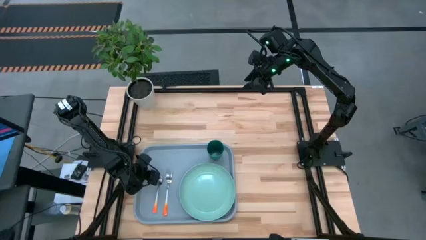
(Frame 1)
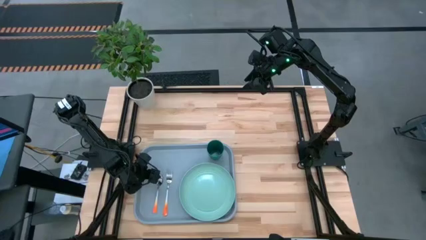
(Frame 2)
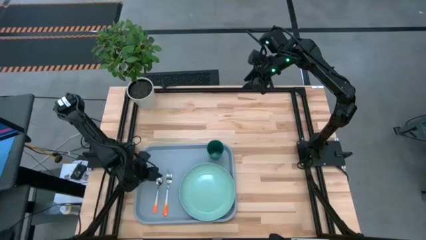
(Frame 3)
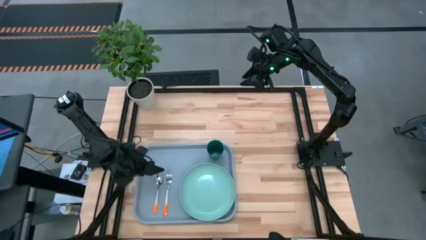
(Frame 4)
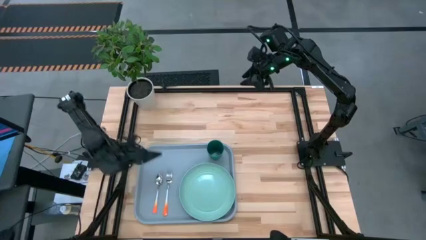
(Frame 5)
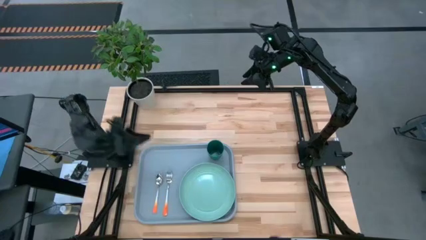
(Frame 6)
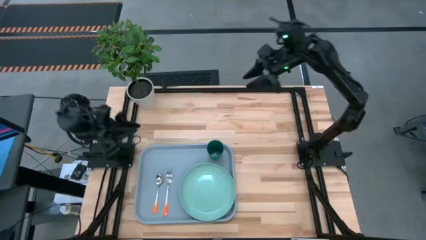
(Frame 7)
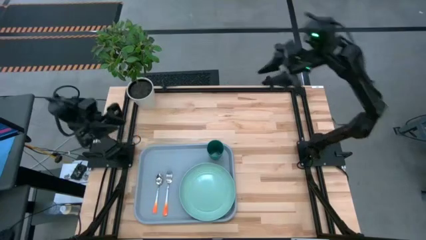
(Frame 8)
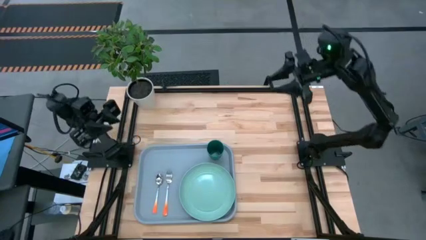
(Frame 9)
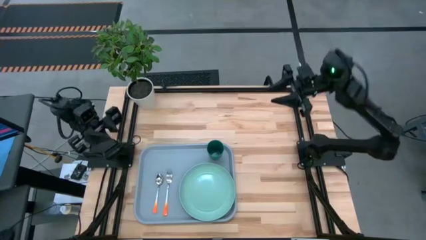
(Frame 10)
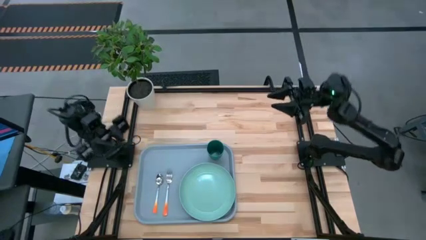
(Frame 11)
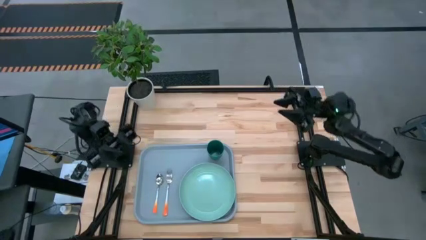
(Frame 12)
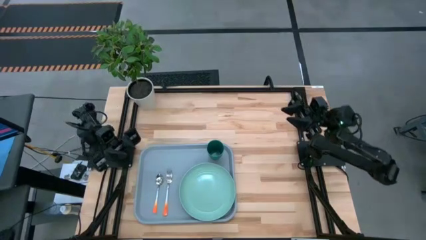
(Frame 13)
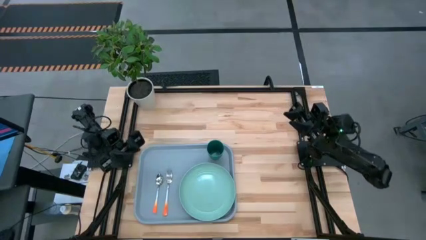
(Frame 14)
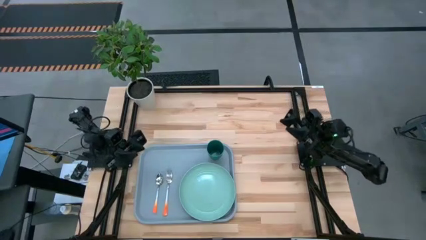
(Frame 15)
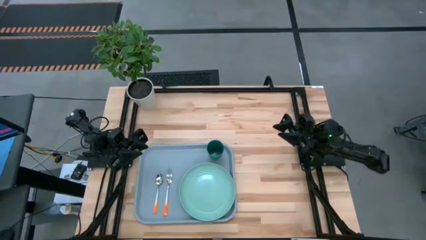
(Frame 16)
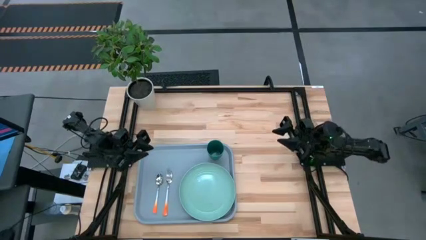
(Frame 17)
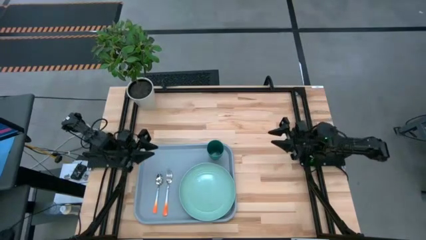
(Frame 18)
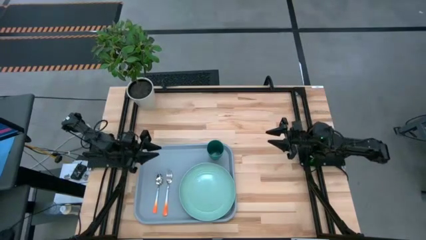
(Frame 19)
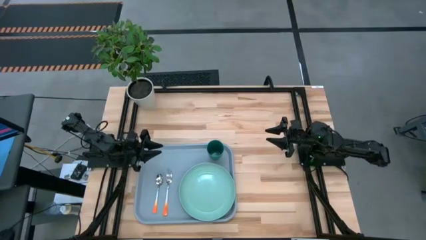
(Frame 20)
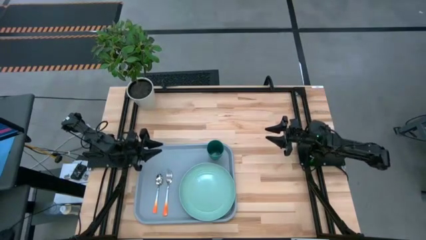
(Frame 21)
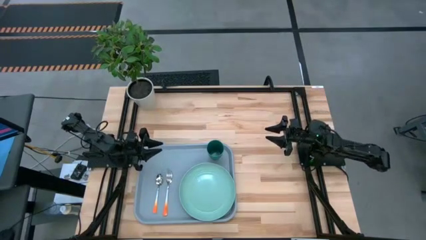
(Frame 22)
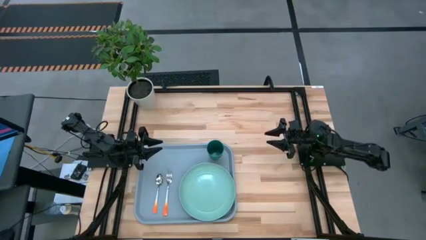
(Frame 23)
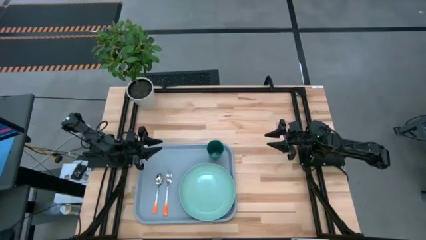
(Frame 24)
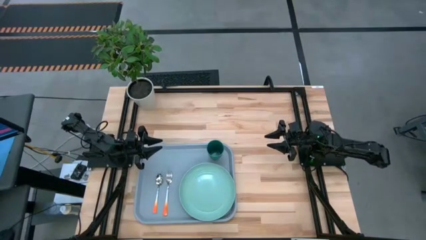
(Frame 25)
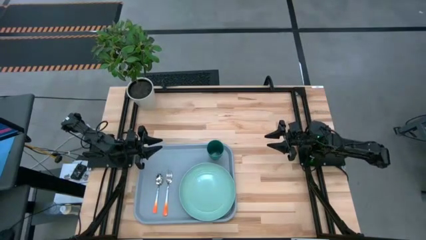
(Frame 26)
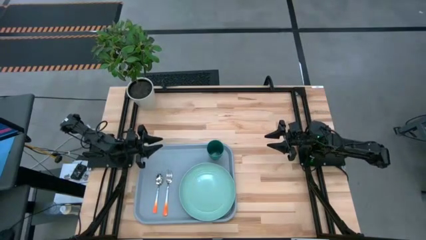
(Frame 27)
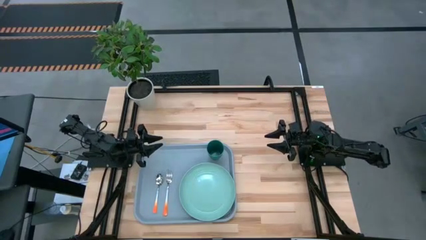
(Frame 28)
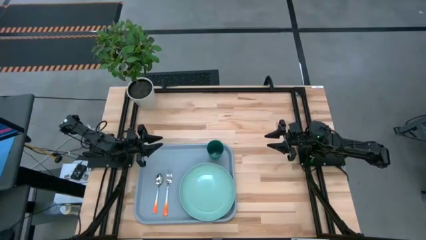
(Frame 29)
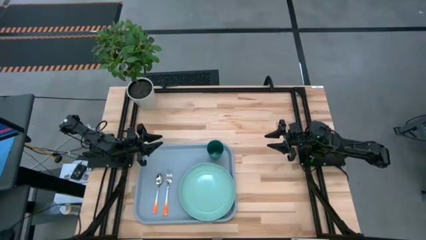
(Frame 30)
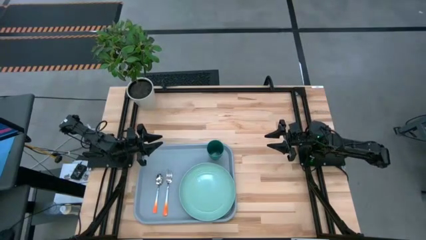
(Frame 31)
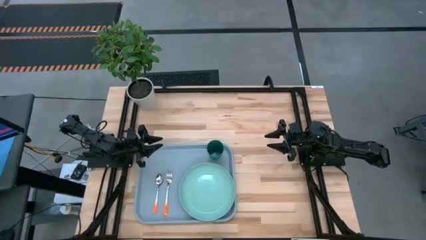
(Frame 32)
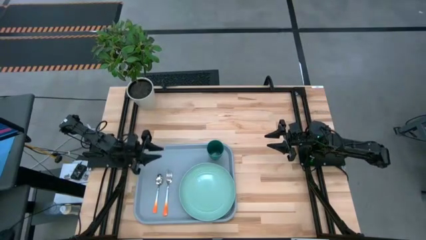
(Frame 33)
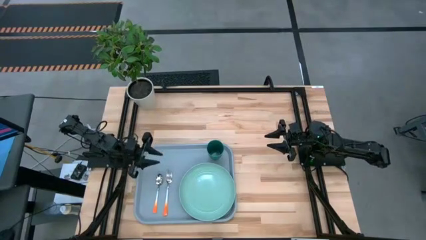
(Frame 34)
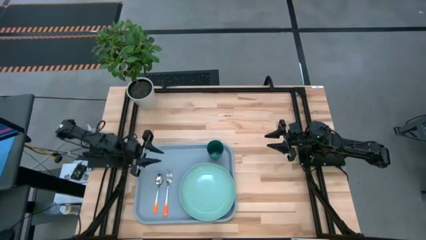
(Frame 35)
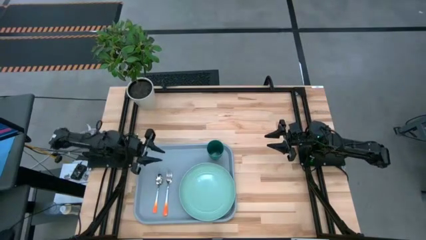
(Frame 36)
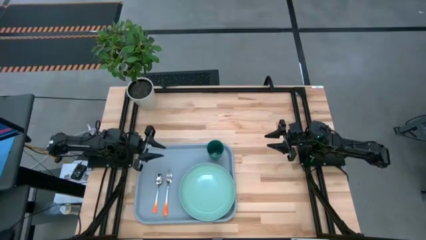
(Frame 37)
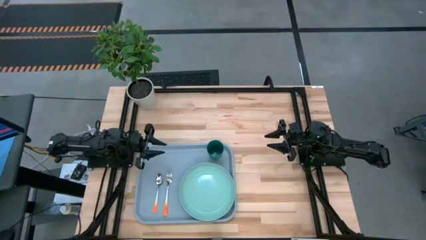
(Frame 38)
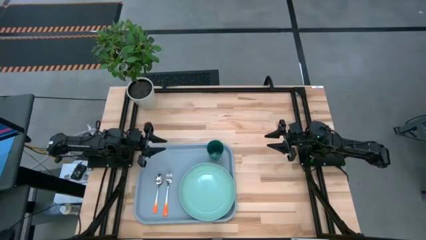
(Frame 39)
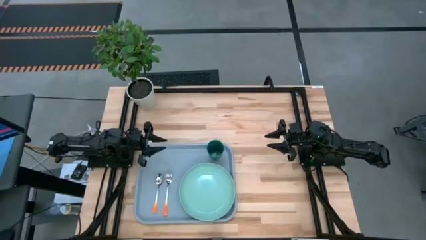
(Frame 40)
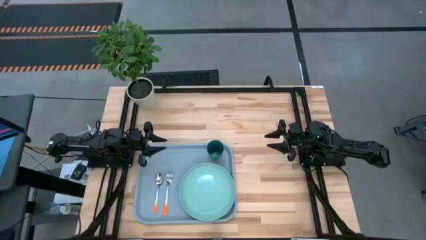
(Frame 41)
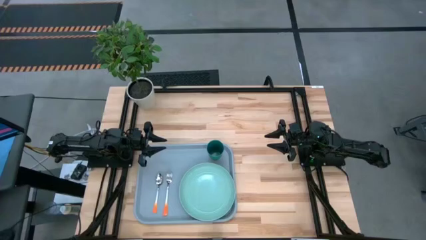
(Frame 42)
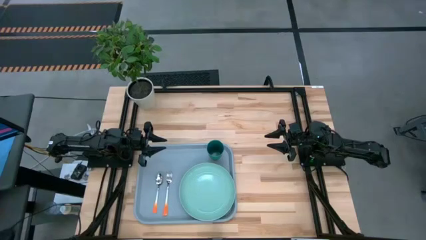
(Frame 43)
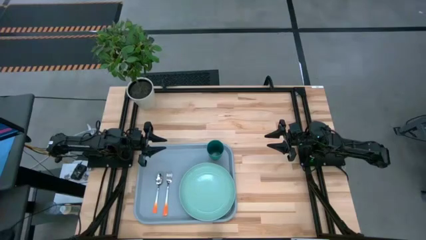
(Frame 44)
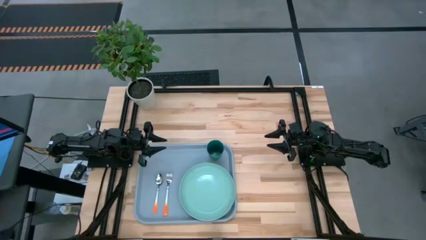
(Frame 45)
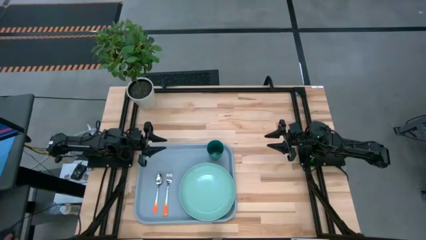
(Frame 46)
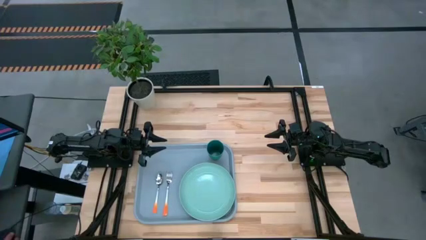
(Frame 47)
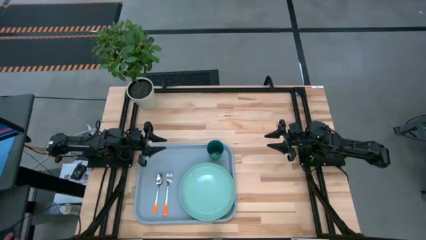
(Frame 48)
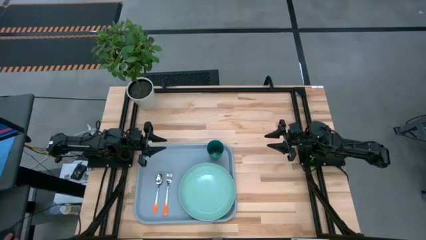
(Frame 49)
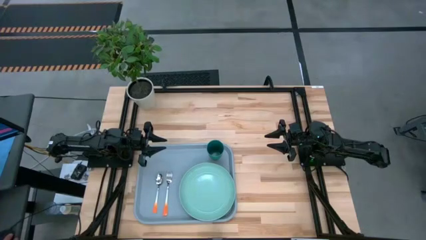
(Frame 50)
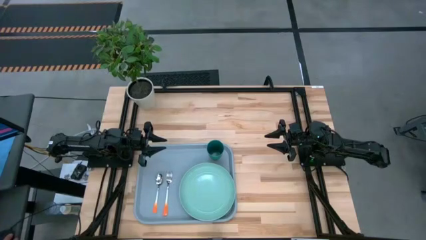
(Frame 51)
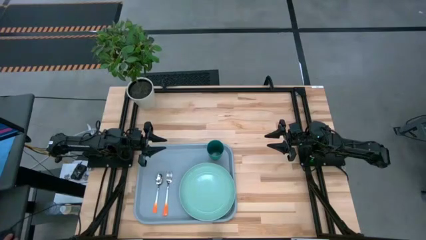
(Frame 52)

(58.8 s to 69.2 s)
Task: Pick and place plate/cup/fork/spoon on tray
Return to Home position
